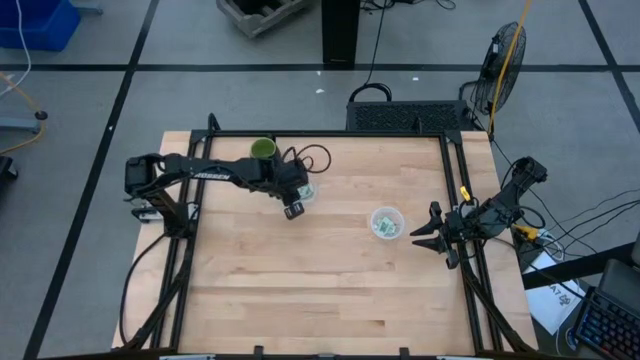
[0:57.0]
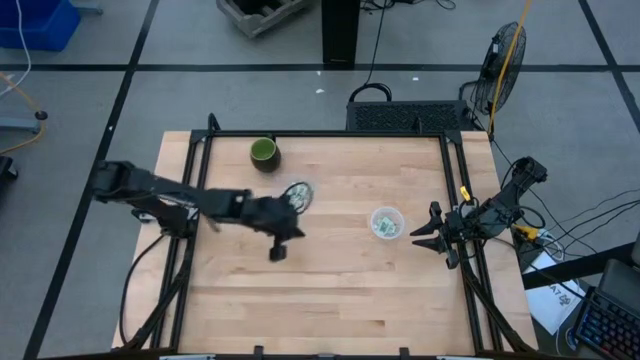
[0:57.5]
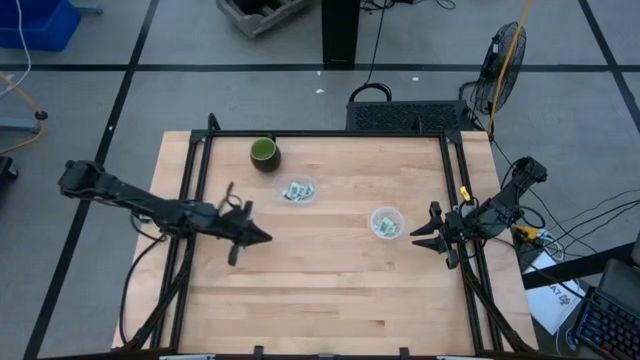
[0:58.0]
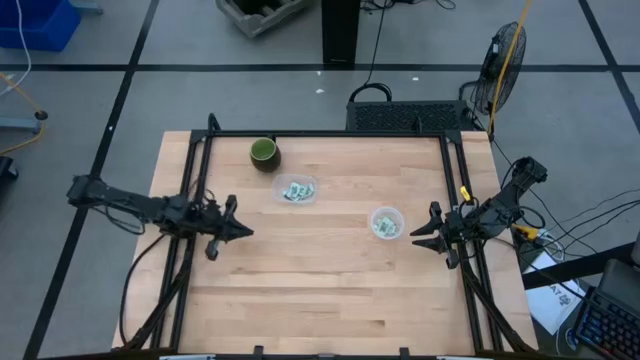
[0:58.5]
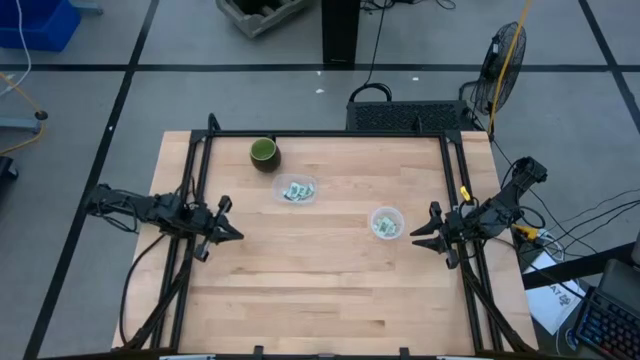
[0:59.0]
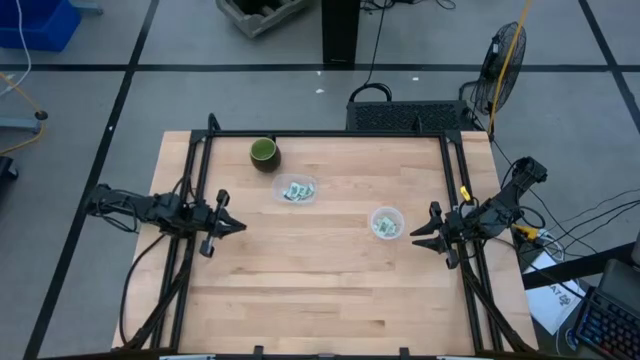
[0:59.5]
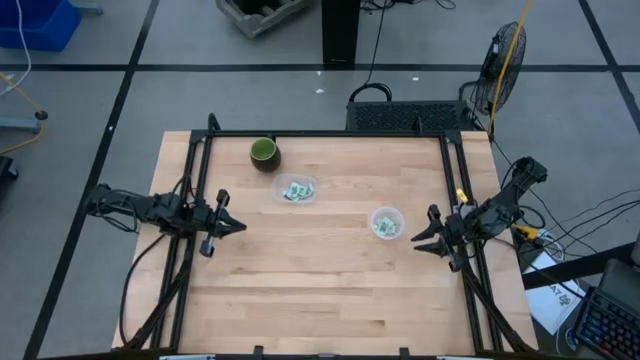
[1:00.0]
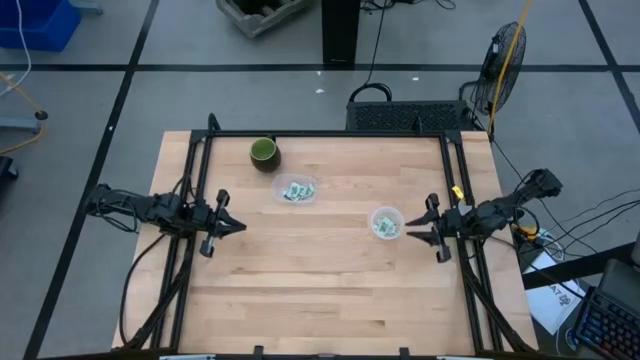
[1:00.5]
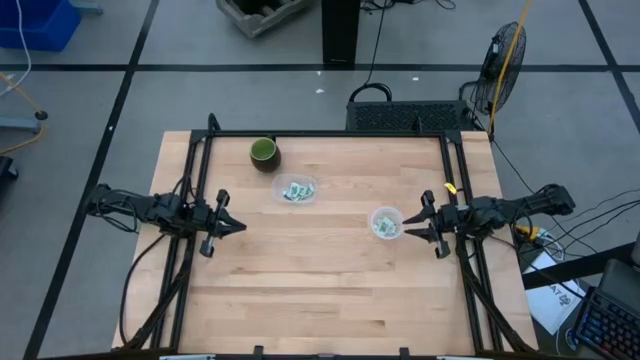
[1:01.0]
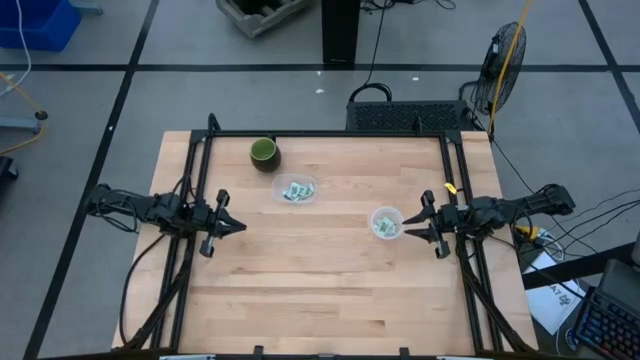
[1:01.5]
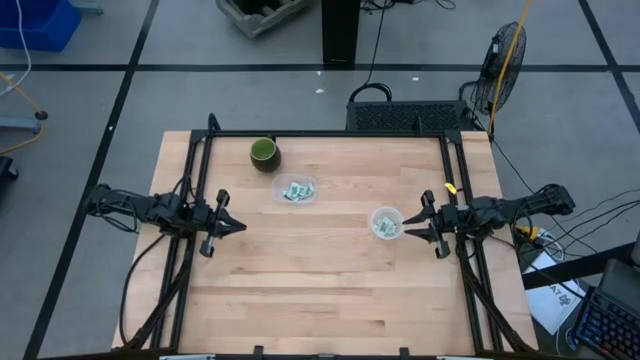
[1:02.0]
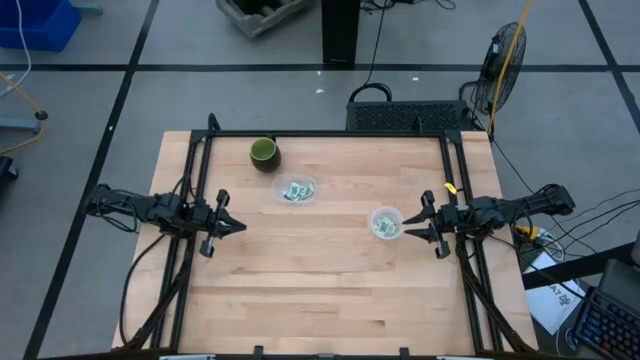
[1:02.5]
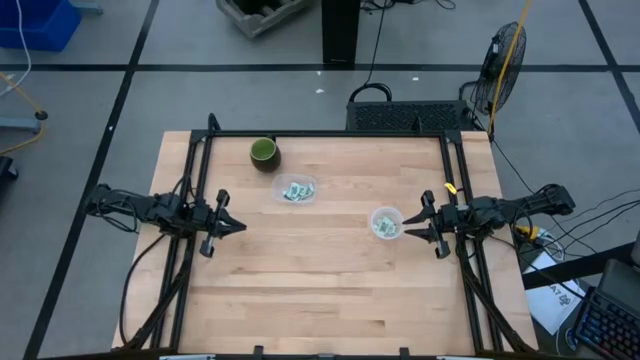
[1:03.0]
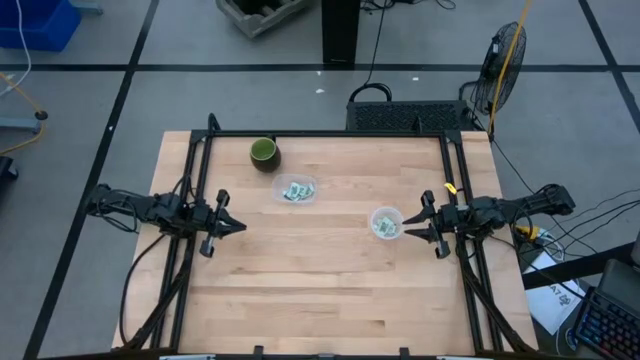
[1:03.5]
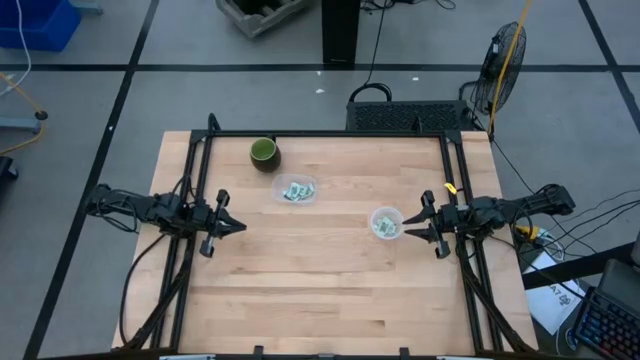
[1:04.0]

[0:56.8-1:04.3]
Task: Pick and place items into bin
Return to Home Position

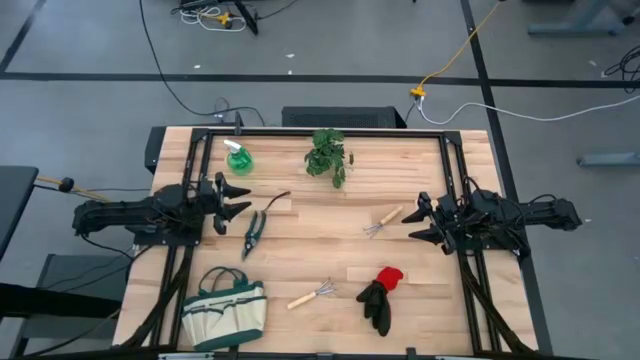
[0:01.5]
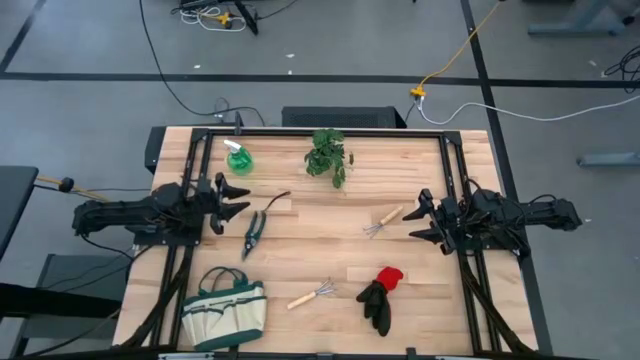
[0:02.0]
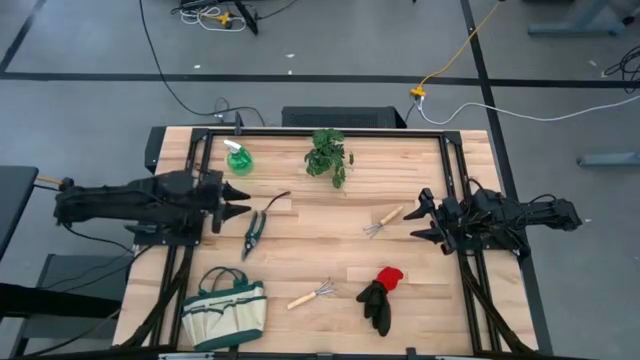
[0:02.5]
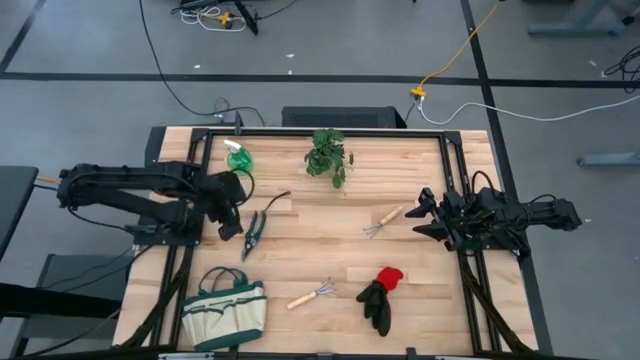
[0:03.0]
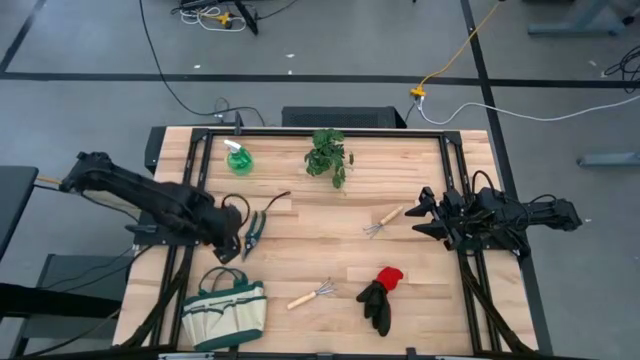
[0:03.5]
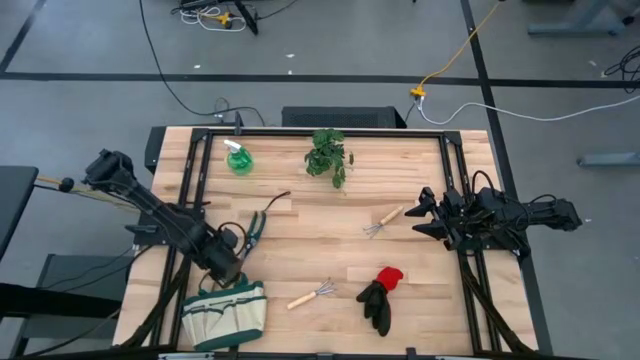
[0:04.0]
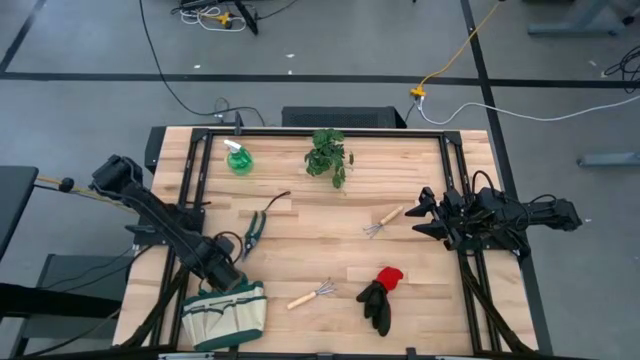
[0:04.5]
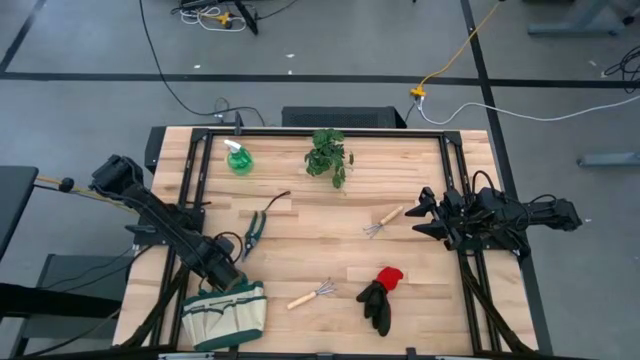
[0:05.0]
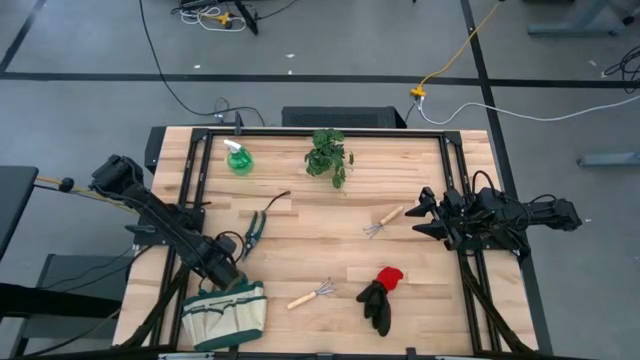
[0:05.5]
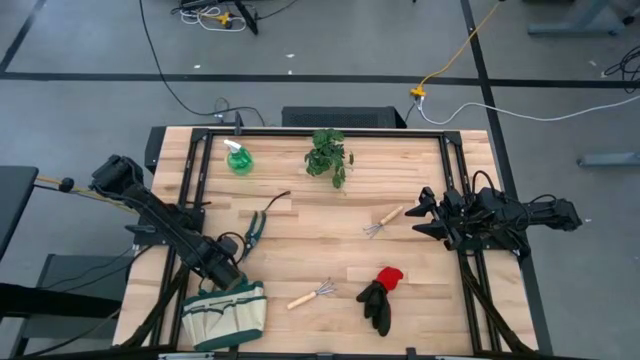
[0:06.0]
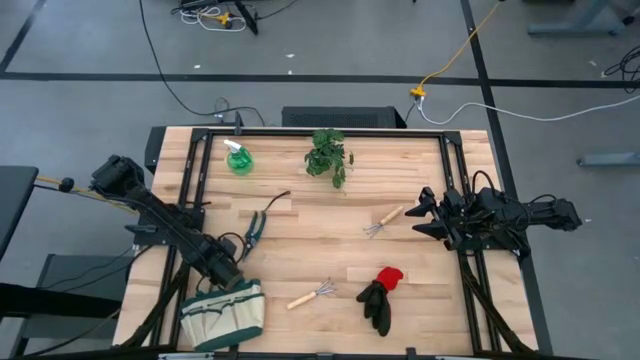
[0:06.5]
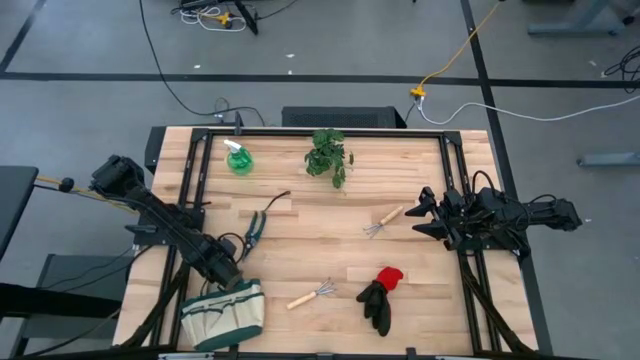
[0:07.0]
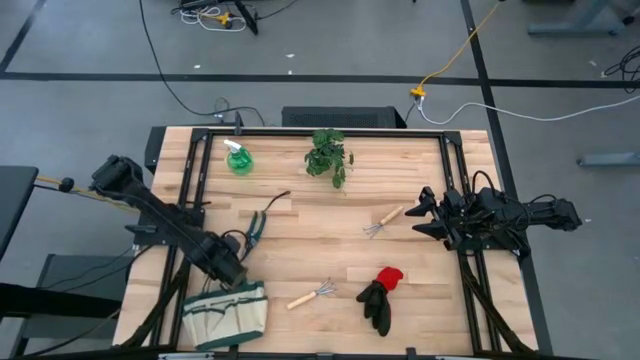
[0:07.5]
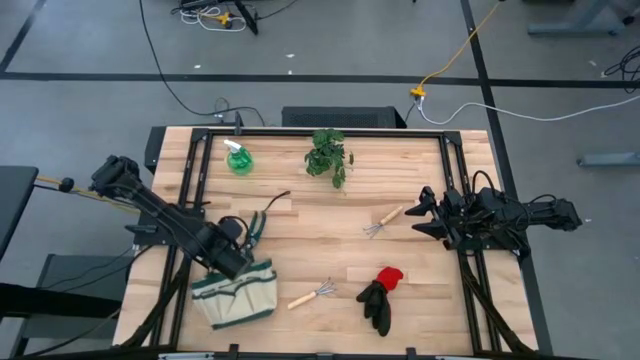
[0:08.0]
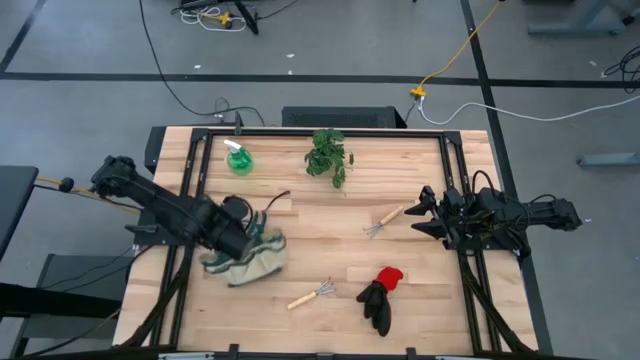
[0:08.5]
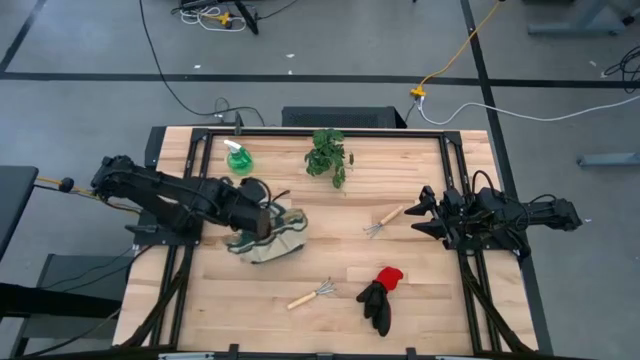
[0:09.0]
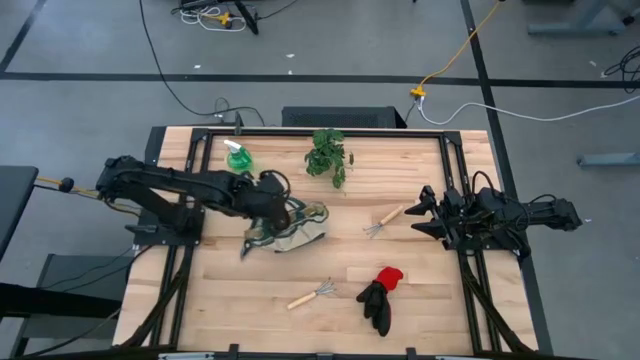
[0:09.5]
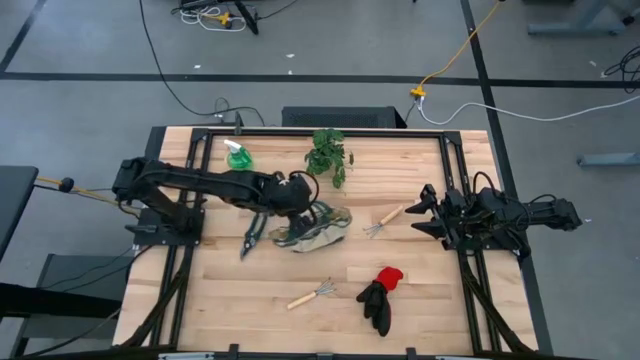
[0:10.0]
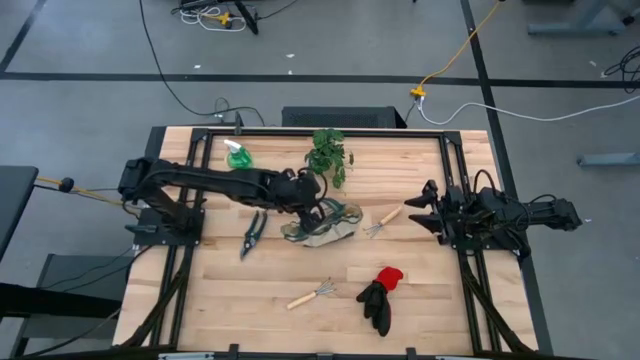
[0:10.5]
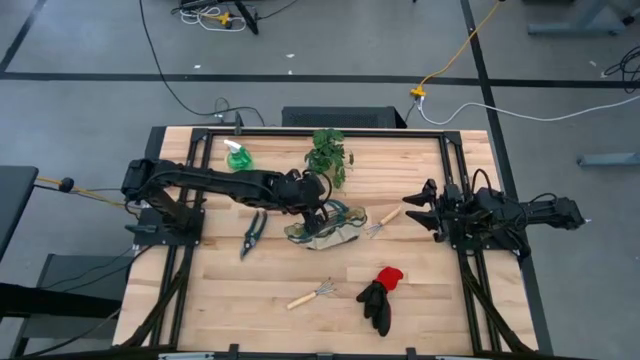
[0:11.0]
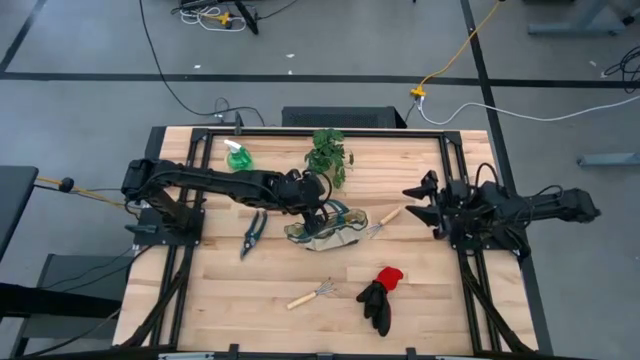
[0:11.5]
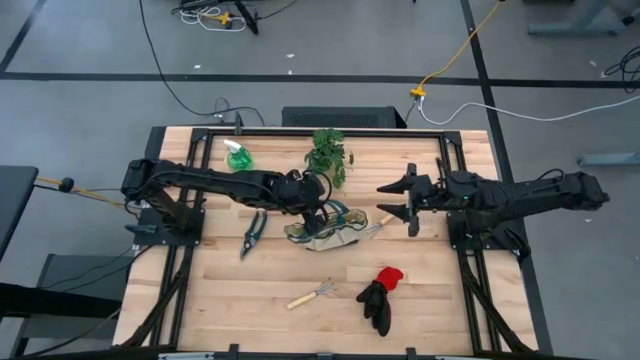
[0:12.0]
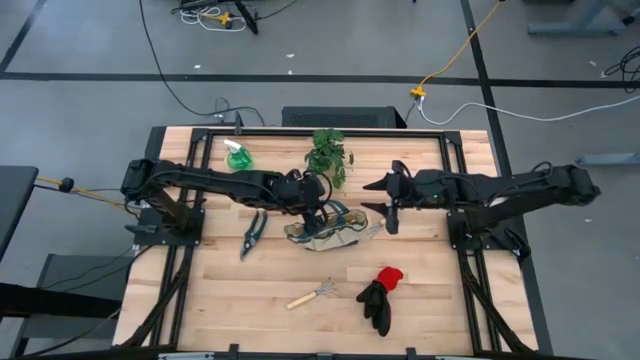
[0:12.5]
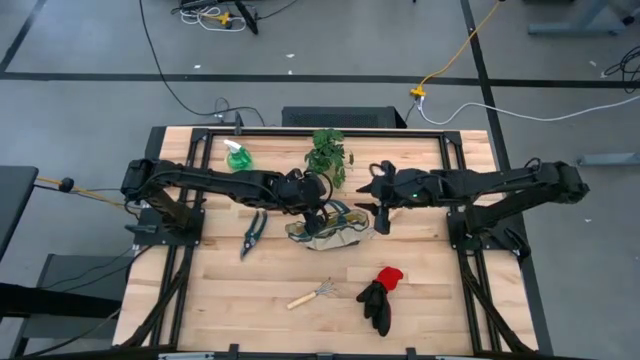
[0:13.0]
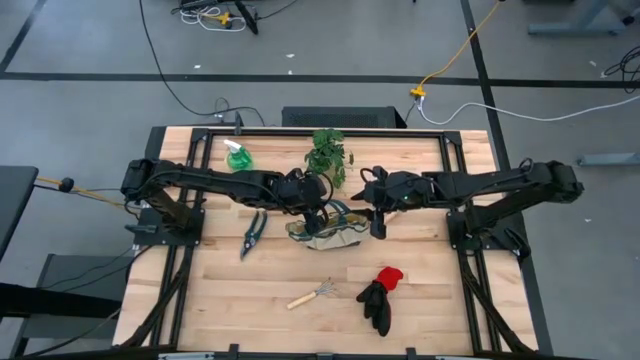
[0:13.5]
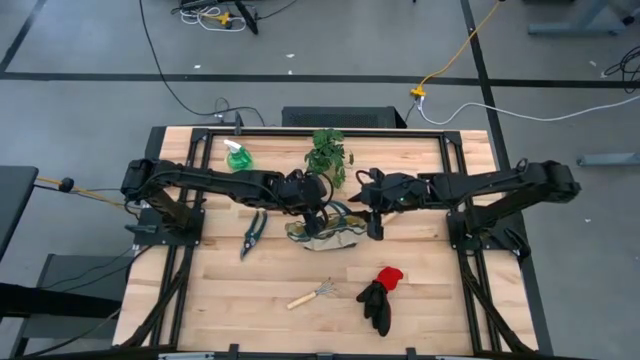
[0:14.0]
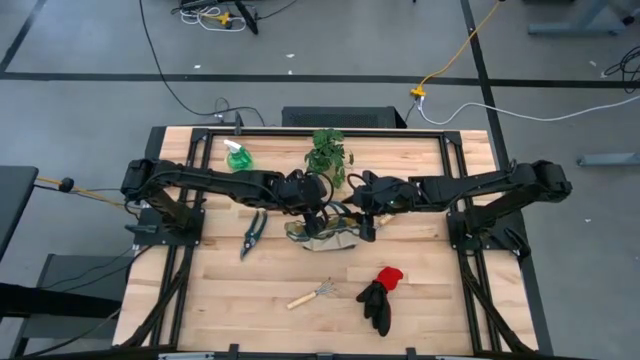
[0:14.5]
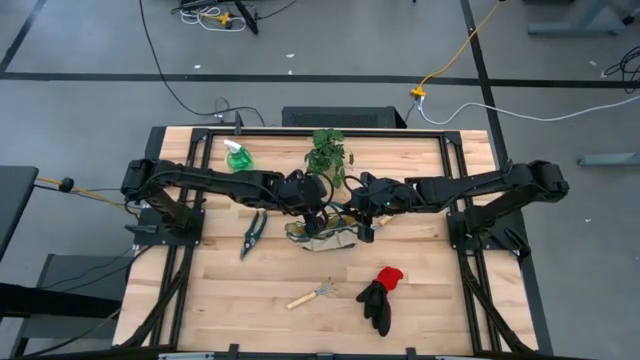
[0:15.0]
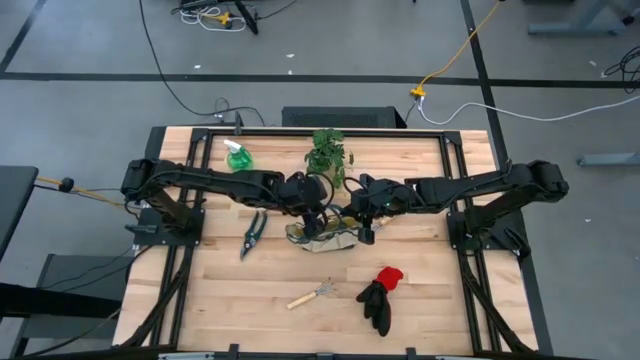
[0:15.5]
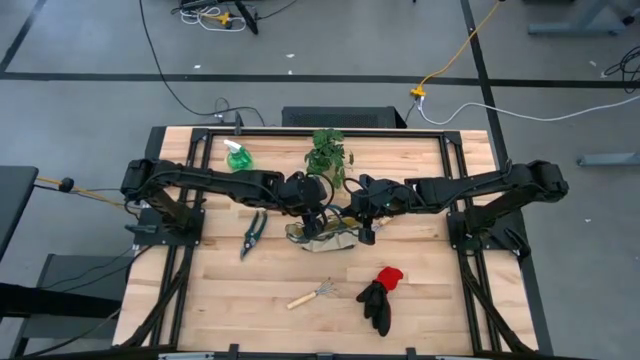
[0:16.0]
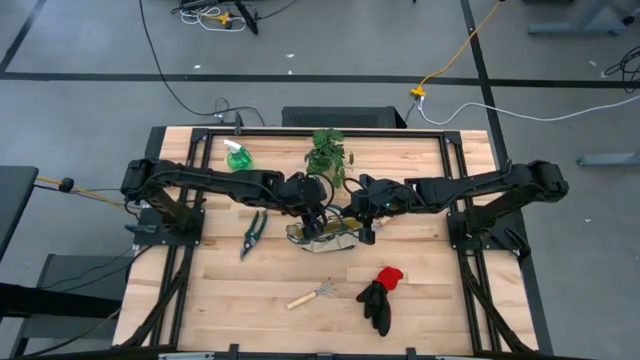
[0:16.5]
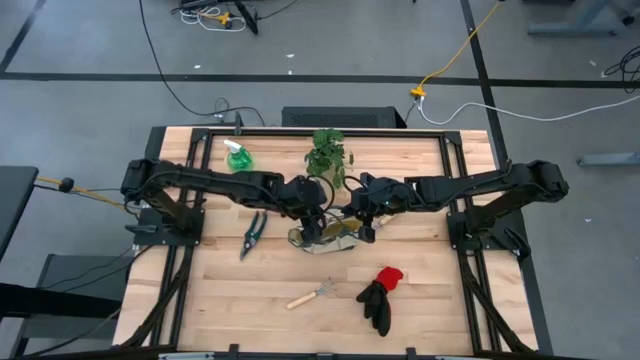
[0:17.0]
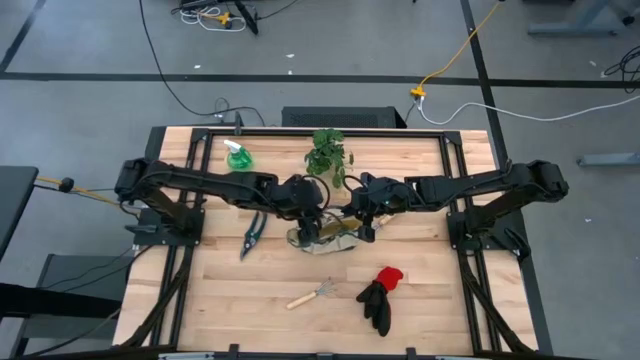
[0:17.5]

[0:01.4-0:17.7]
Task: Pick & Place Garden tools in Gardening bag
Prepare the green gardening bag
